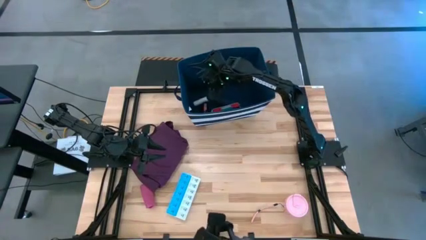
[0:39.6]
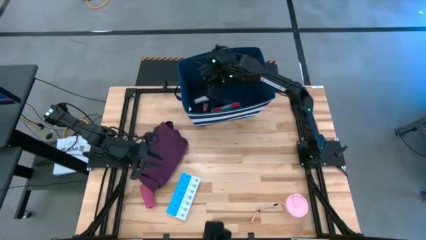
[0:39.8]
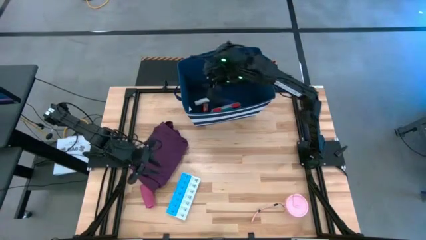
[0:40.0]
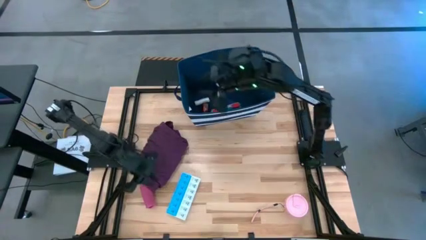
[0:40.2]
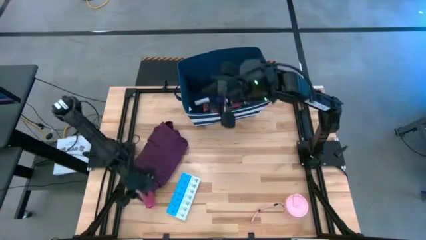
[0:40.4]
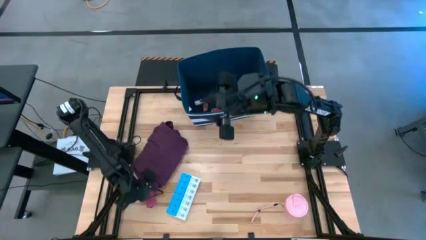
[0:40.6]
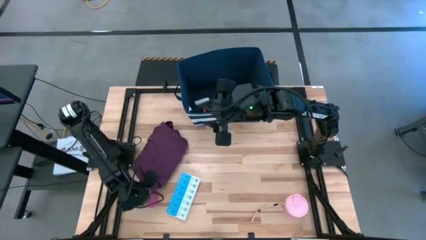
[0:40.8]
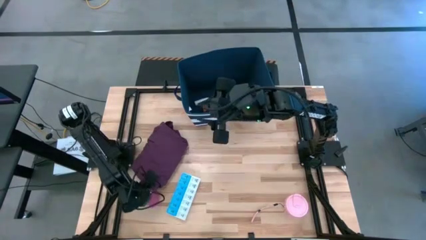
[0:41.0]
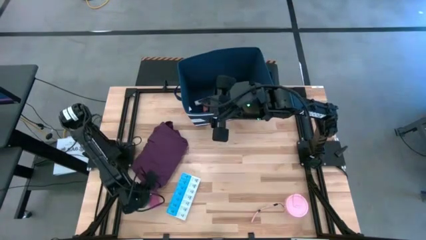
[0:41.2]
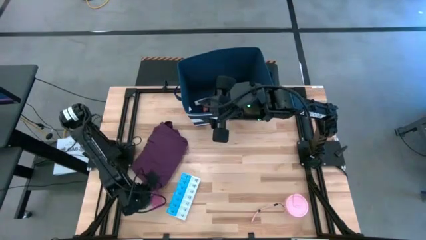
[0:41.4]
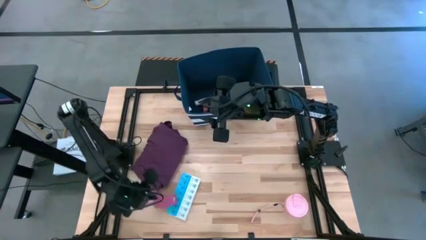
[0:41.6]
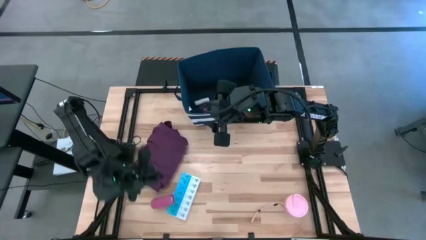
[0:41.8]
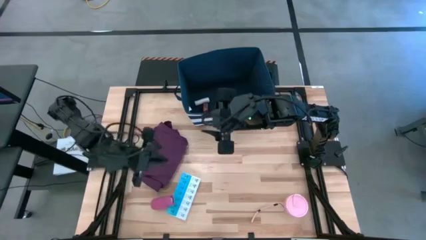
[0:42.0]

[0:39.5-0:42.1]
Task: Pick & place medical supplies in basket/bin
Put the red bandage into the blue bin

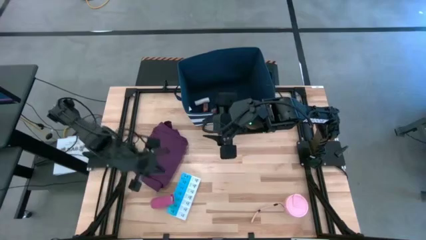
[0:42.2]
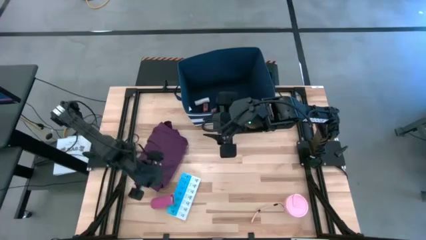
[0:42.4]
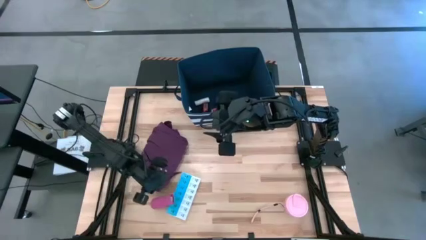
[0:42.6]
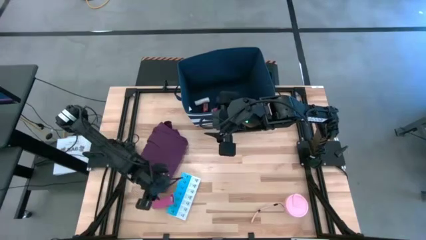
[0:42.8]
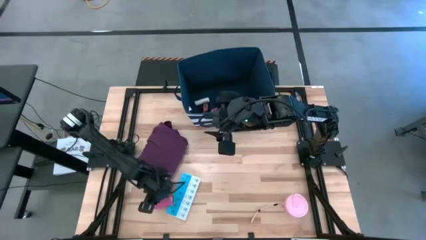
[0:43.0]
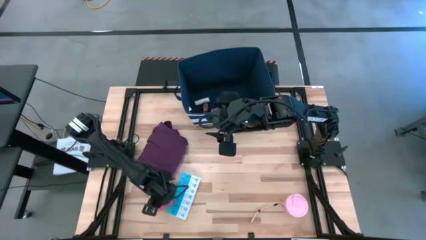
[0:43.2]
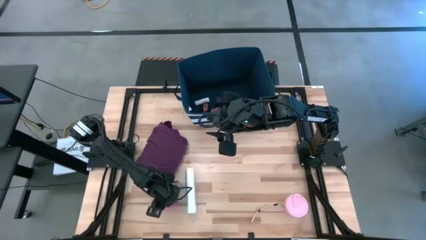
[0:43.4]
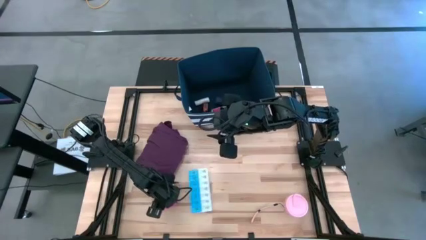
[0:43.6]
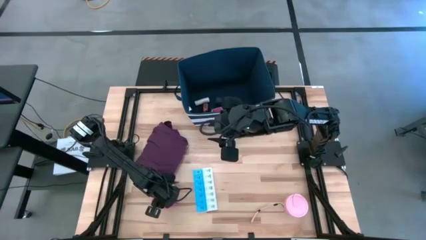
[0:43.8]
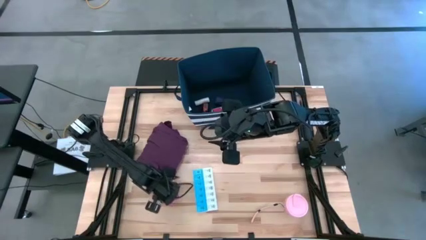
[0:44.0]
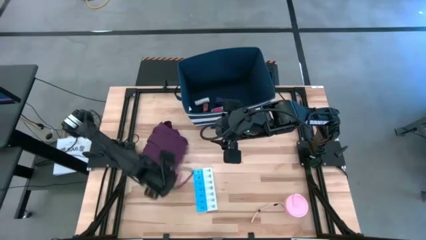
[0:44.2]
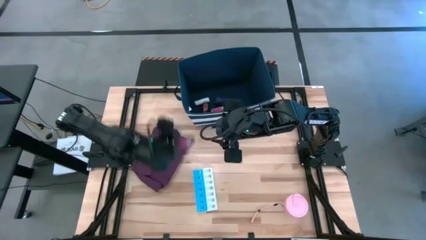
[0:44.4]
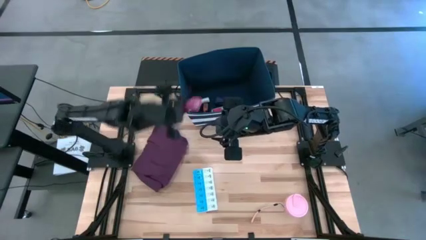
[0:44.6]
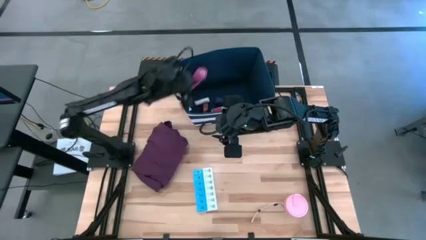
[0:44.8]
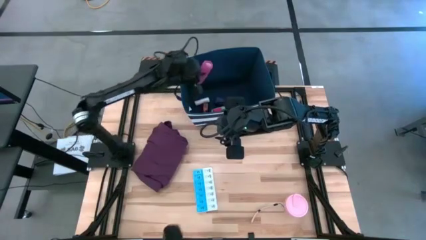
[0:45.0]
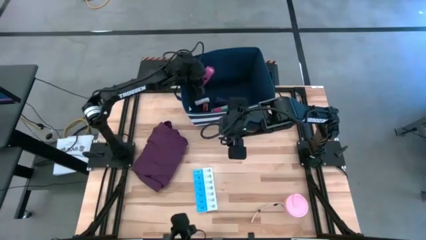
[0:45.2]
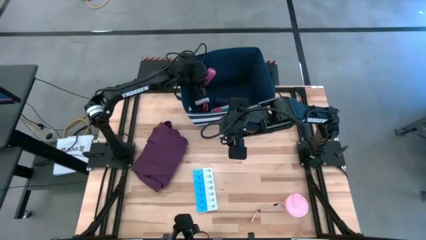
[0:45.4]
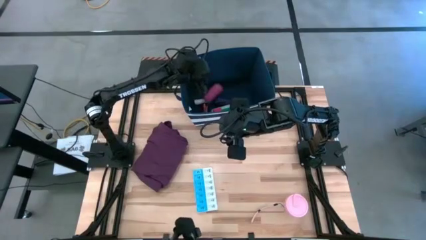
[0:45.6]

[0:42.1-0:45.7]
Put the red bandage into the blue bin

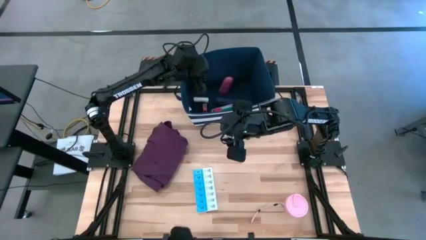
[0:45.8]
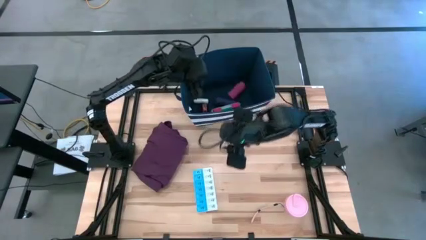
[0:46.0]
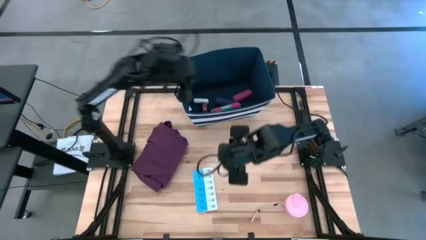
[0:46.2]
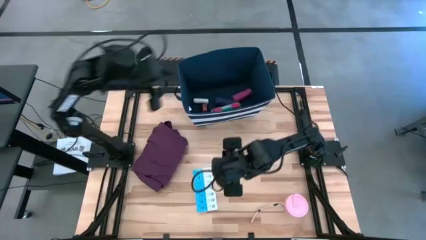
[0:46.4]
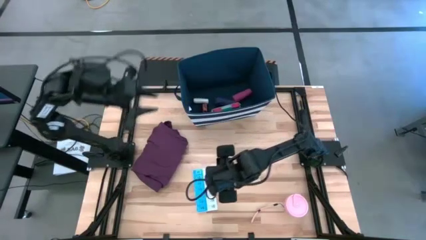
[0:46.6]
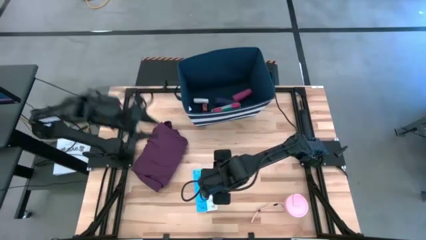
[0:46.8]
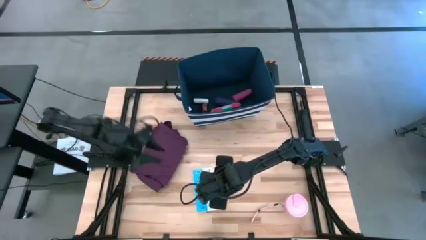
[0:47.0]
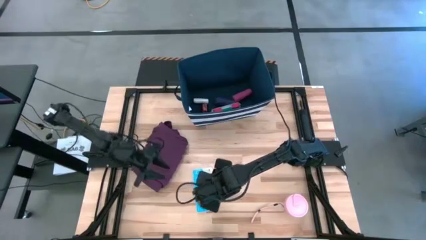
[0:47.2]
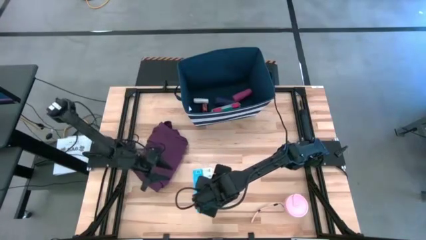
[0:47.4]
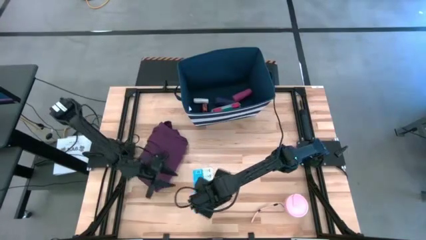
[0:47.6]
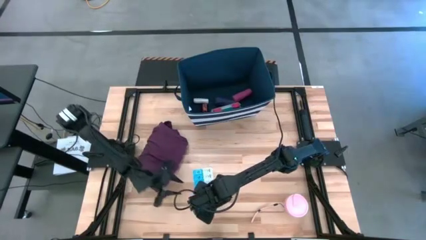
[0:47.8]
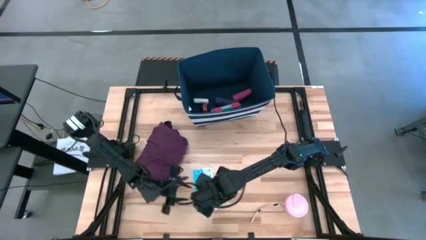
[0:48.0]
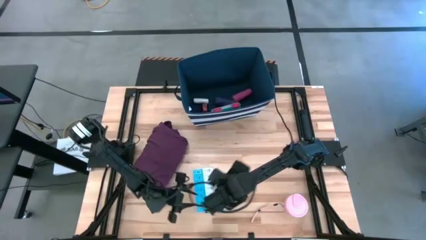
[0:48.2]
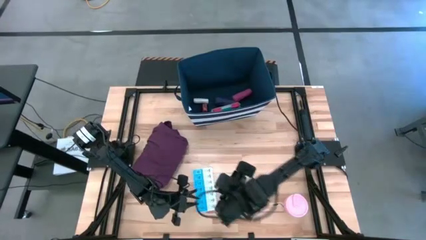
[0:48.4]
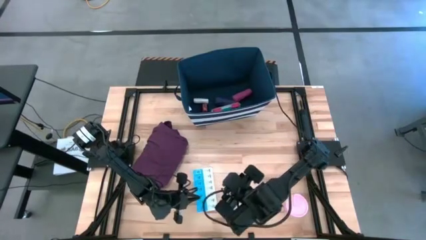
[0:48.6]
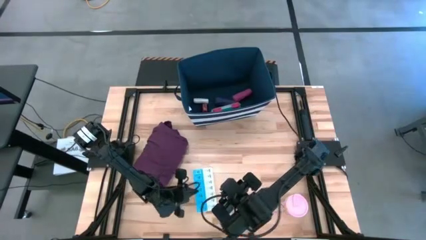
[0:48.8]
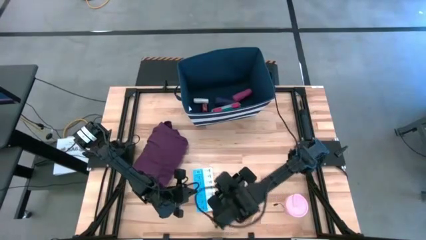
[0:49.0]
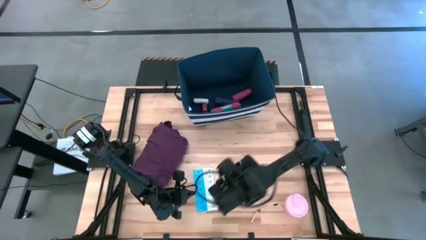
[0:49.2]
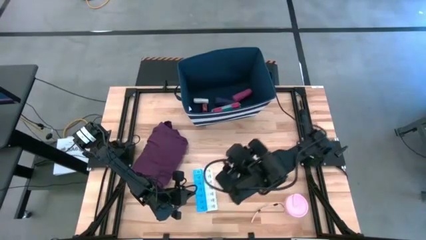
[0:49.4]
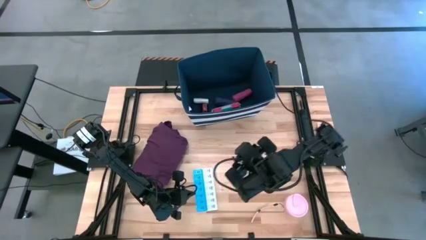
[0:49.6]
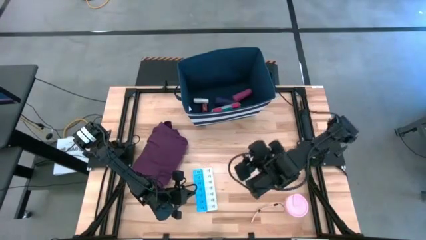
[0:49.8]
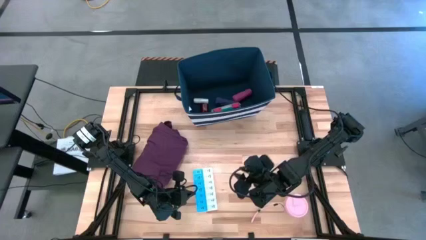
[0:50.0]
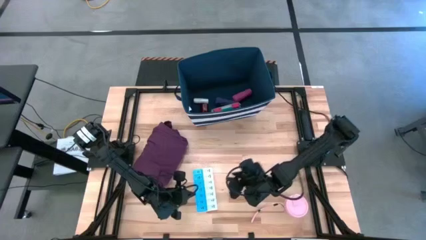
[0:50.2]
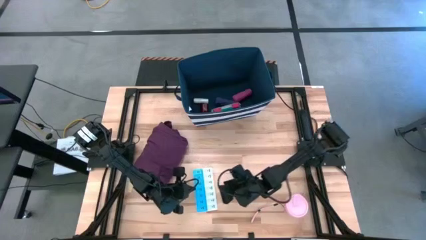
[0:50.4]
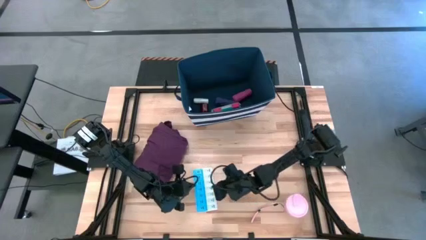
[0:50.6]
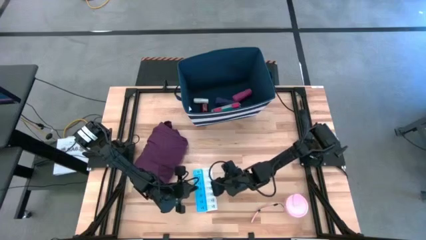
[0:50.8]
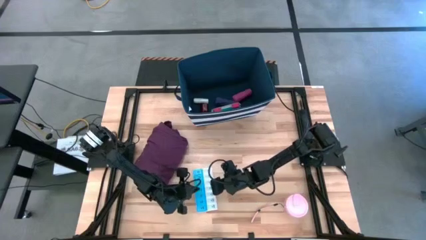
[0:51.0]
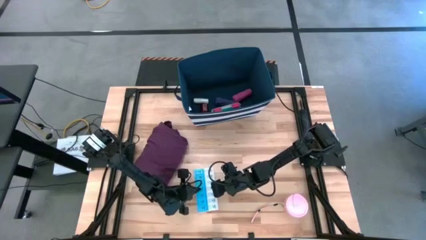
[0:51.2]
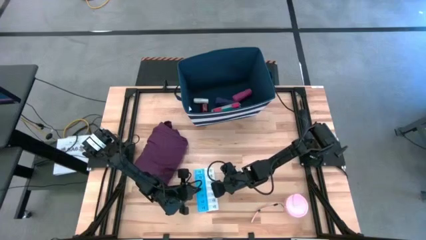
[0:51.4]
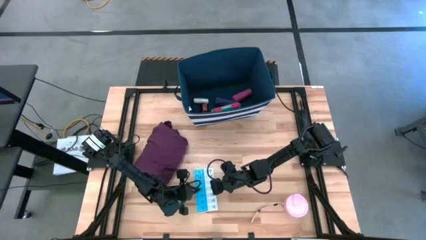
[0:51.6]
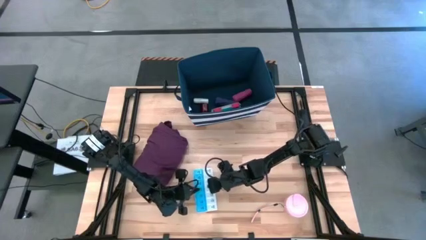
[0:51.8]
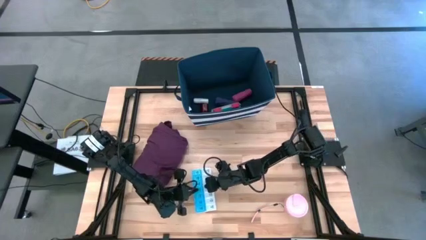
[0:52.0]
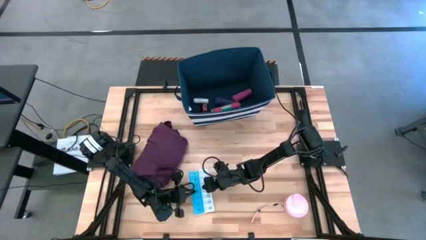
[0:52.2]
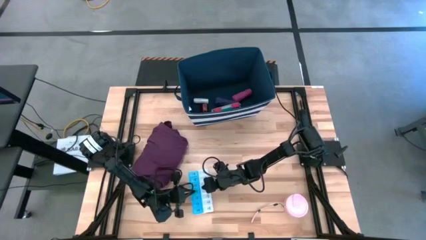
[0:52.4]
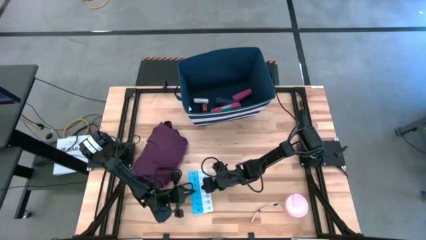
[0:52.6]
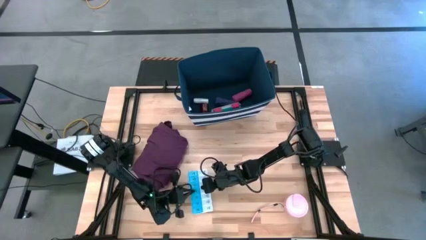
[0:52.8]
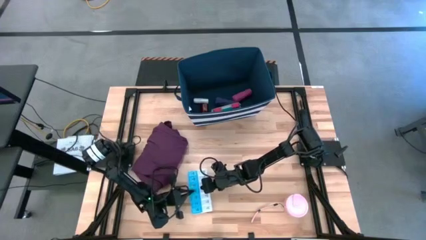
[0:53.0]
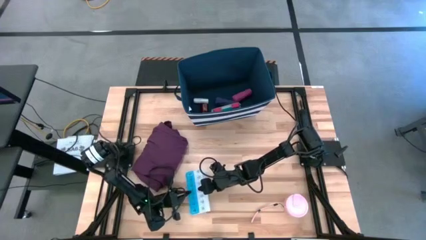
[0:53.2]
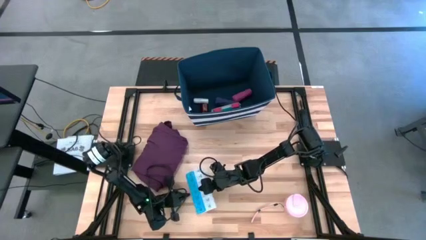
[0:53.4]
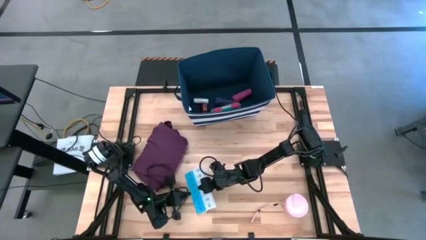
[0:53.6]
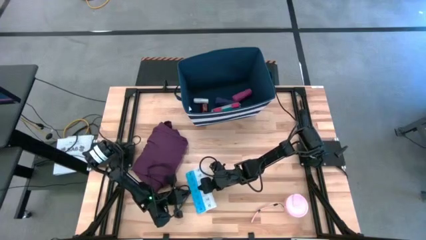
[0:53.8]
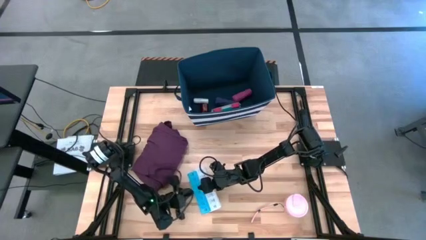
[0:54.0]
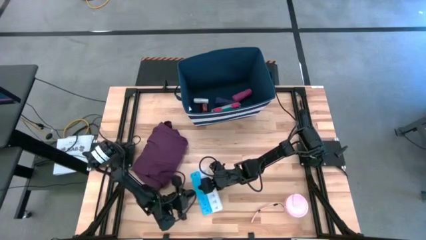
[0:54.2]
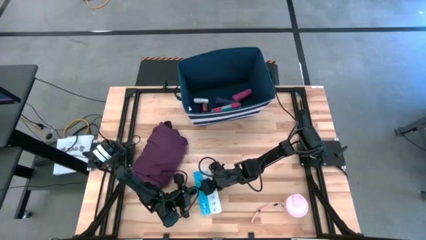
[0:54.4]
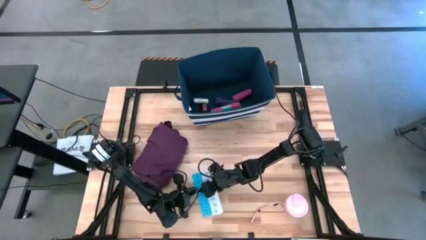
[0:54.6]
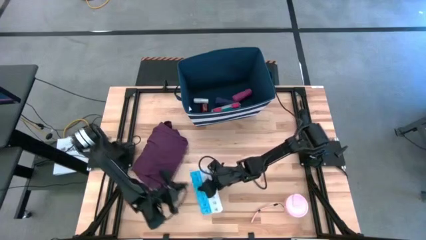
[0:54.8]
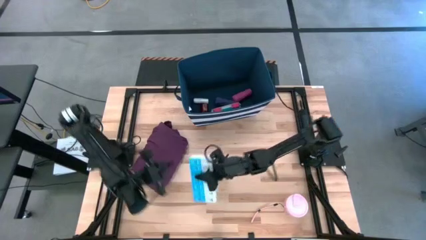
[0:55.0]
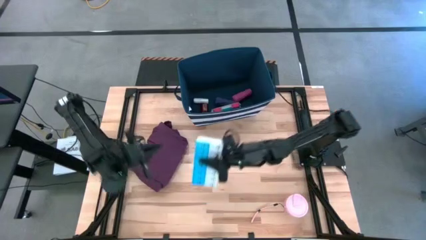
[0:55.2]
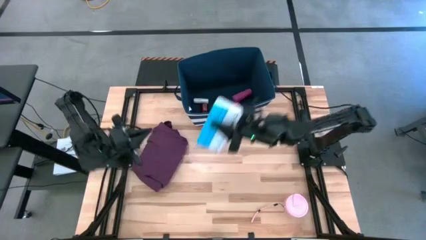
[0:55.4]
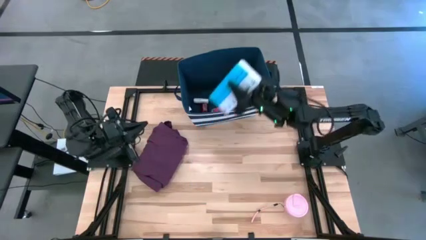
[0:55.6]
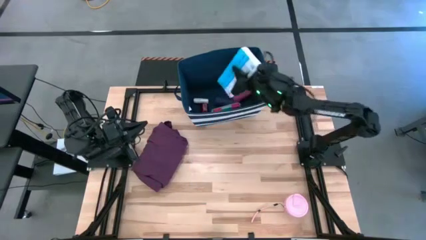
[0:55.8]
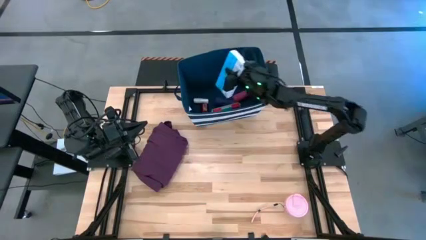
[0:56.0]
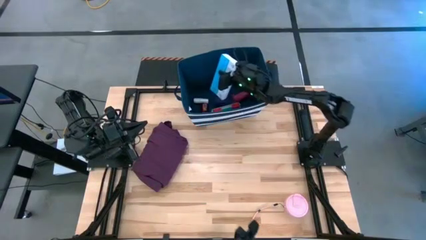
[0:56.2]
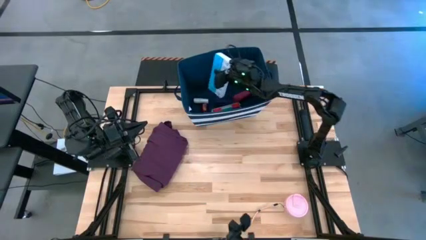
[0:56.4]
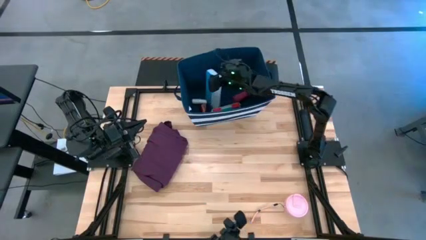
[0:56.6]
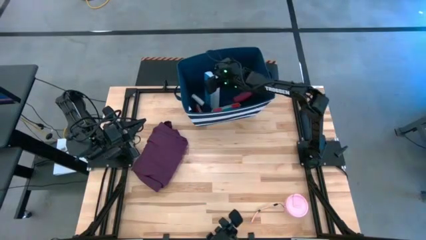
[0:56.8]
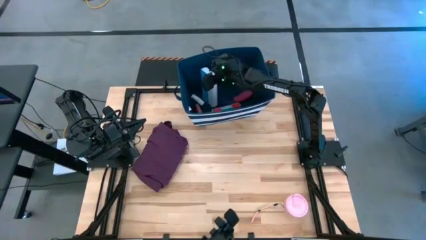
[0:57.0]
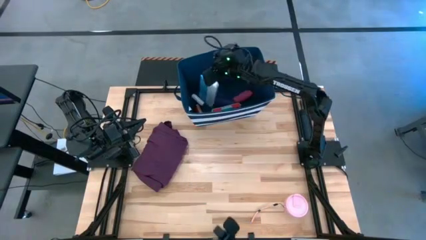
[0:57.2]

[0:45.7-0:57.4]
Put the blue pill organizer into the blue bin
